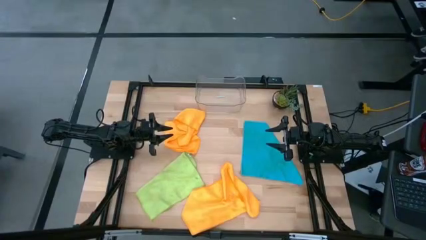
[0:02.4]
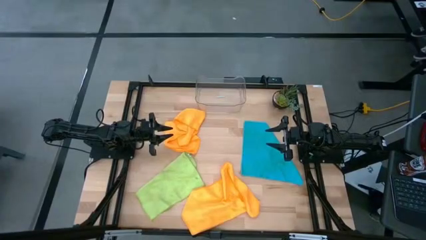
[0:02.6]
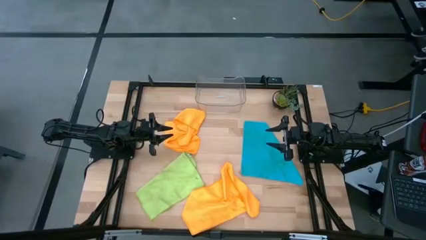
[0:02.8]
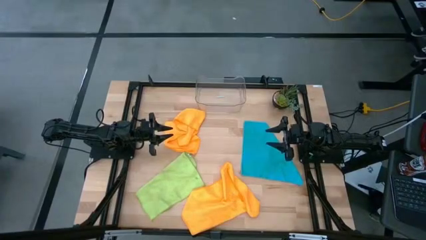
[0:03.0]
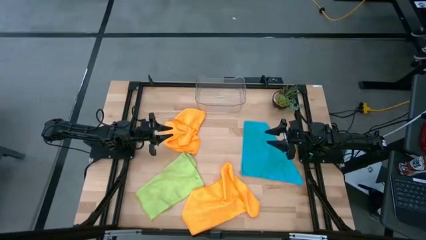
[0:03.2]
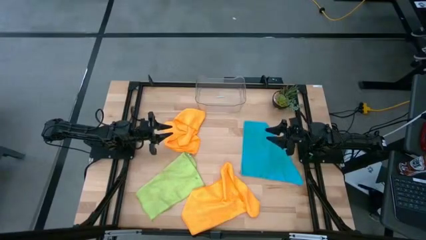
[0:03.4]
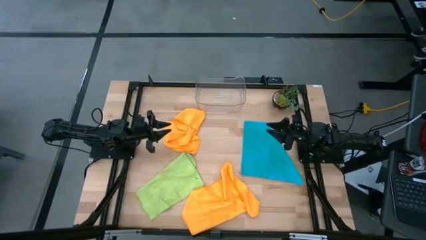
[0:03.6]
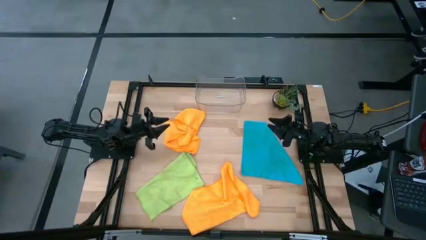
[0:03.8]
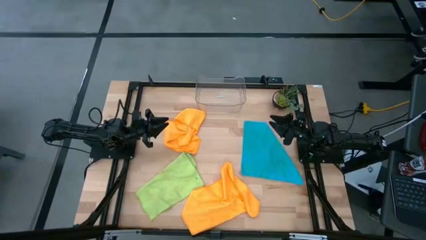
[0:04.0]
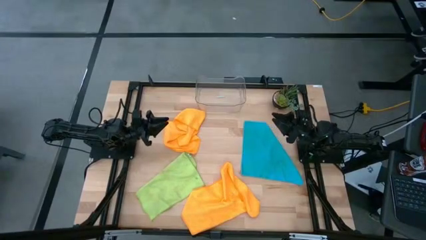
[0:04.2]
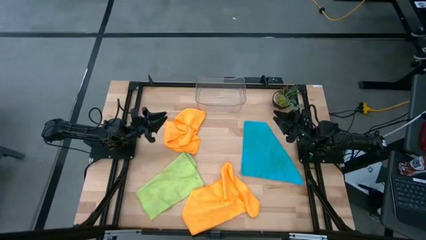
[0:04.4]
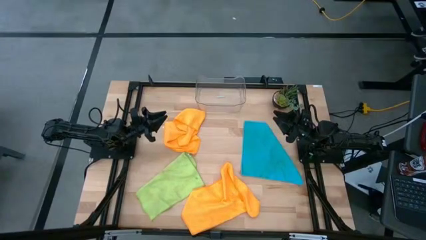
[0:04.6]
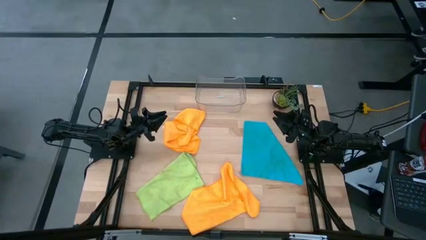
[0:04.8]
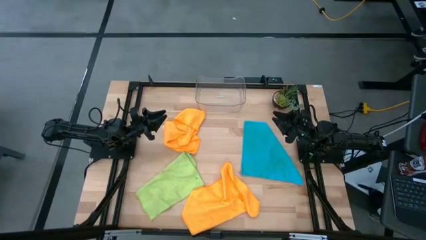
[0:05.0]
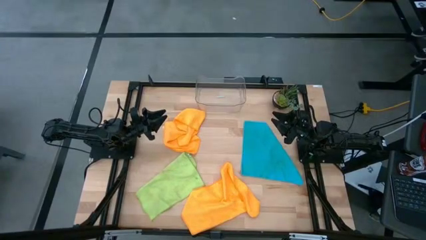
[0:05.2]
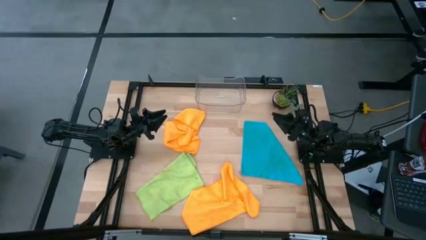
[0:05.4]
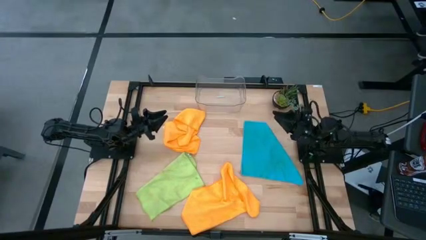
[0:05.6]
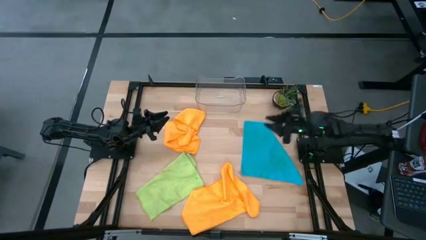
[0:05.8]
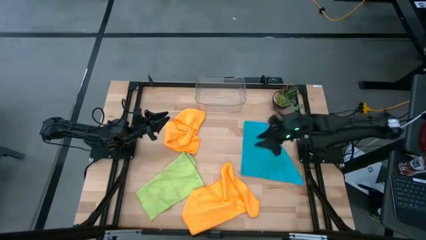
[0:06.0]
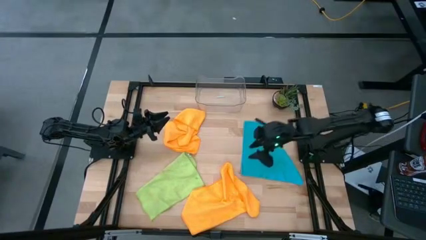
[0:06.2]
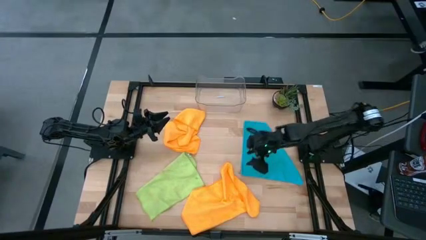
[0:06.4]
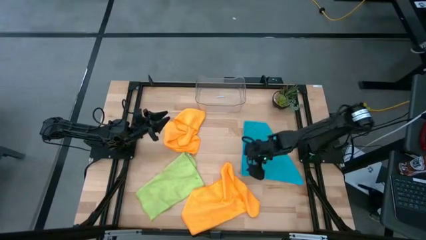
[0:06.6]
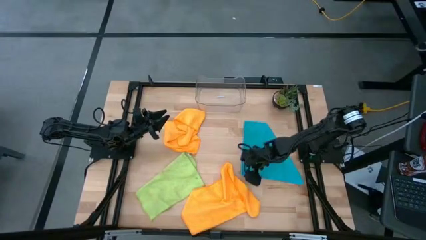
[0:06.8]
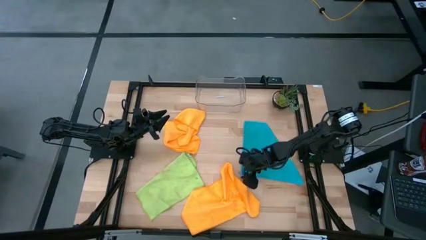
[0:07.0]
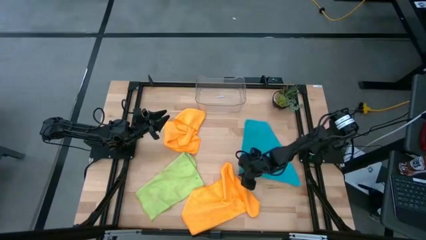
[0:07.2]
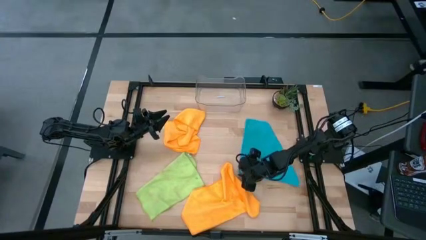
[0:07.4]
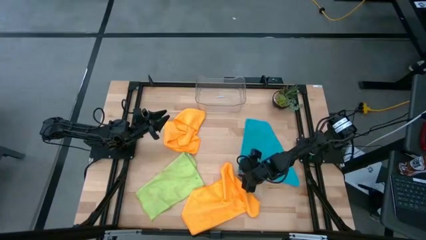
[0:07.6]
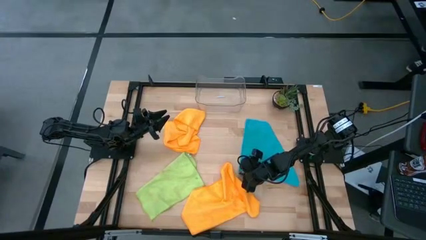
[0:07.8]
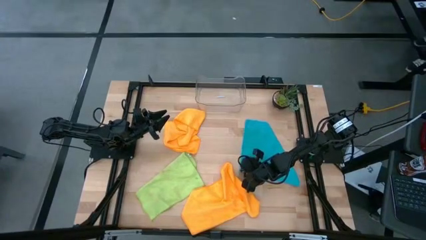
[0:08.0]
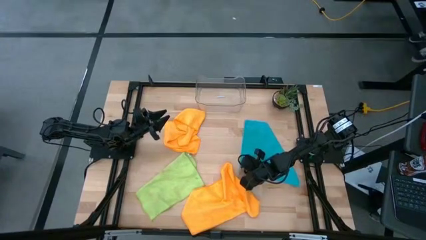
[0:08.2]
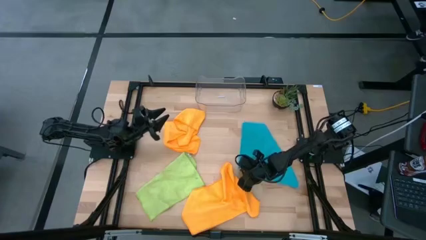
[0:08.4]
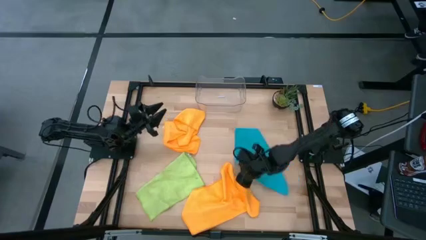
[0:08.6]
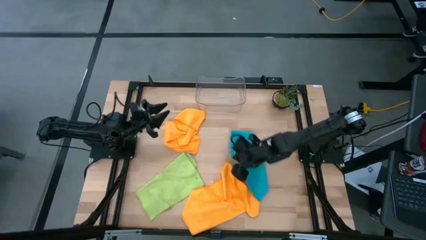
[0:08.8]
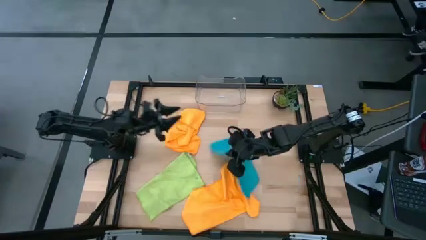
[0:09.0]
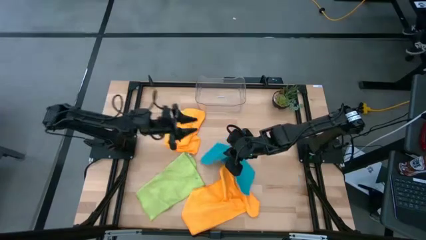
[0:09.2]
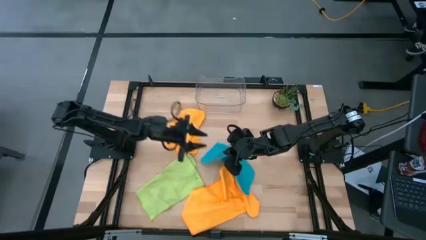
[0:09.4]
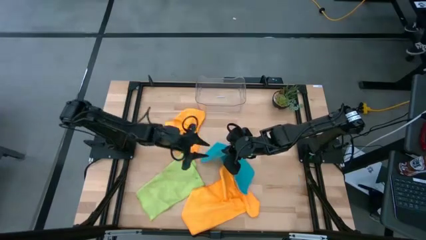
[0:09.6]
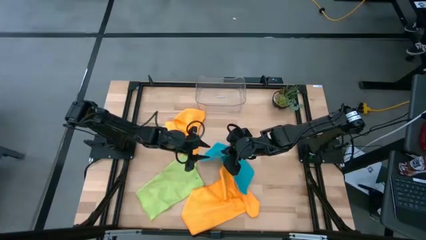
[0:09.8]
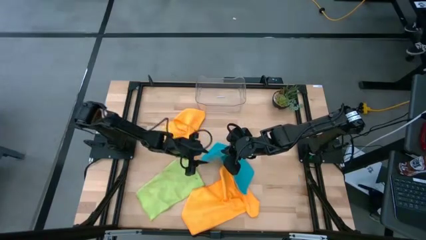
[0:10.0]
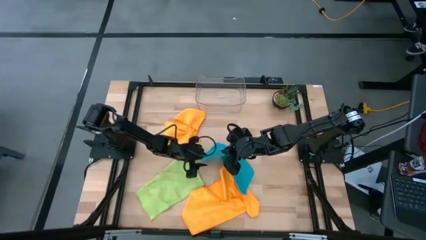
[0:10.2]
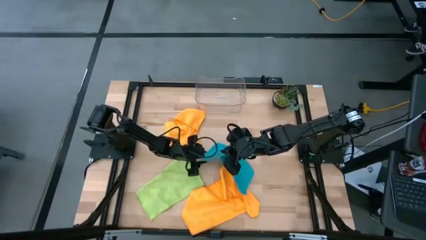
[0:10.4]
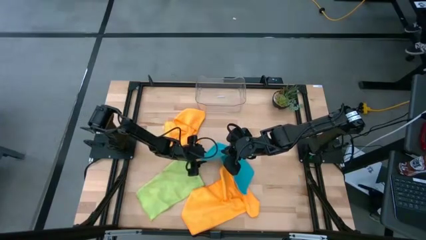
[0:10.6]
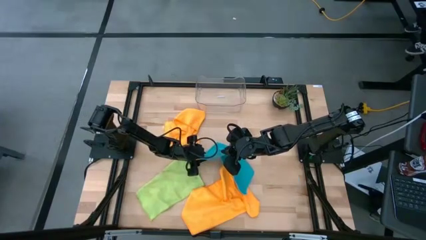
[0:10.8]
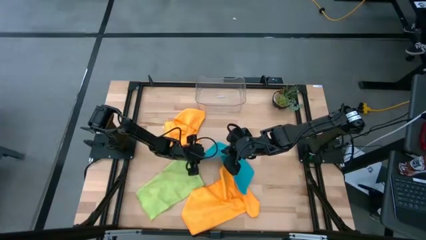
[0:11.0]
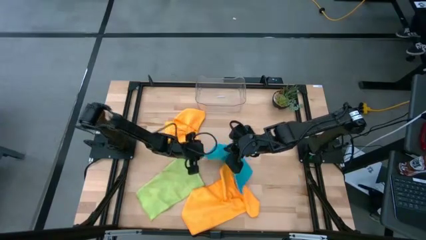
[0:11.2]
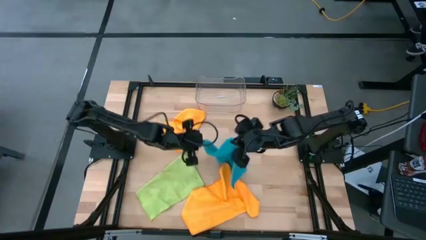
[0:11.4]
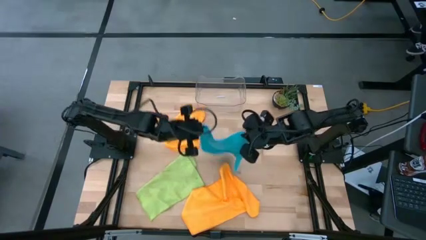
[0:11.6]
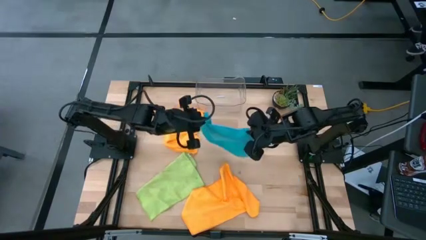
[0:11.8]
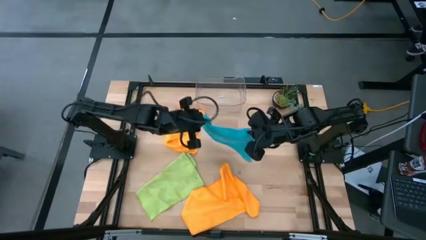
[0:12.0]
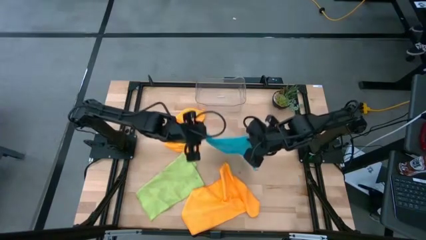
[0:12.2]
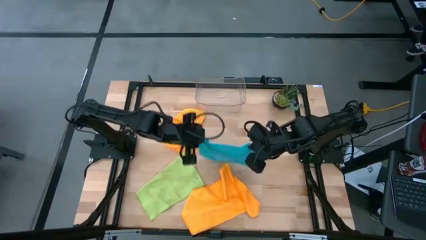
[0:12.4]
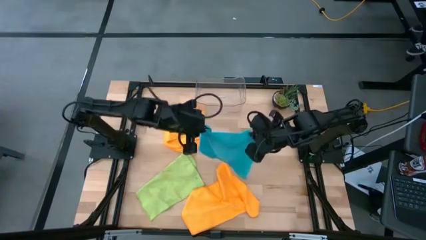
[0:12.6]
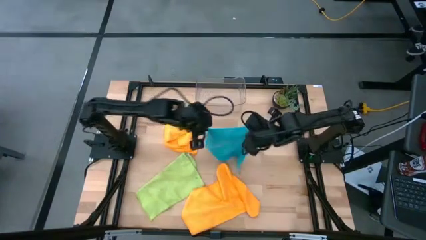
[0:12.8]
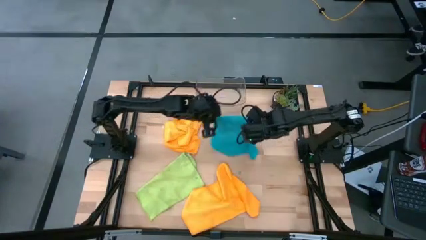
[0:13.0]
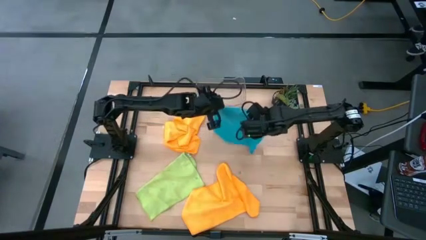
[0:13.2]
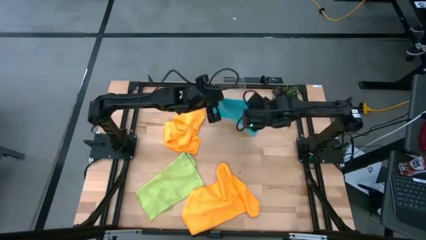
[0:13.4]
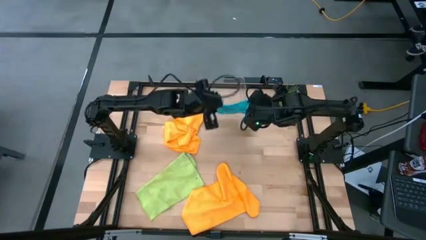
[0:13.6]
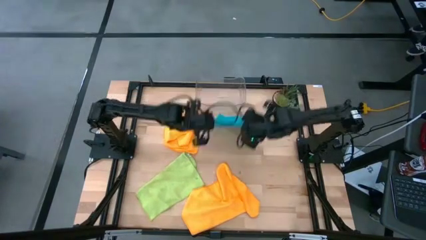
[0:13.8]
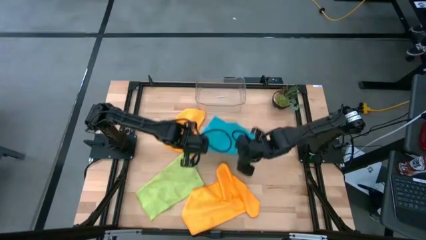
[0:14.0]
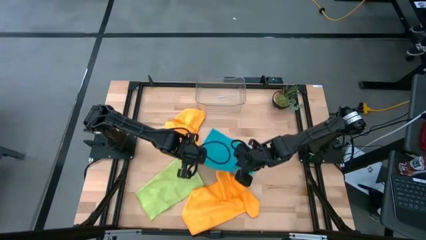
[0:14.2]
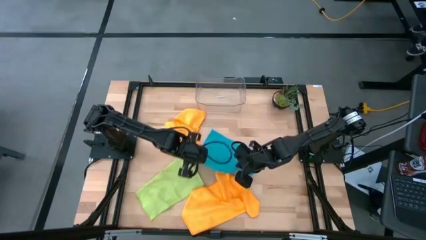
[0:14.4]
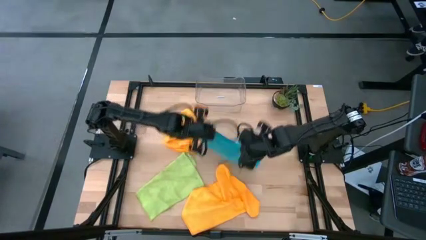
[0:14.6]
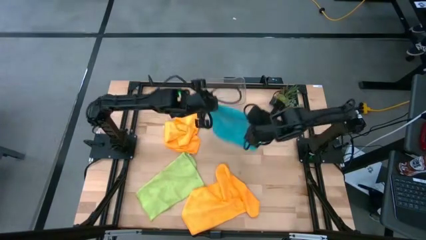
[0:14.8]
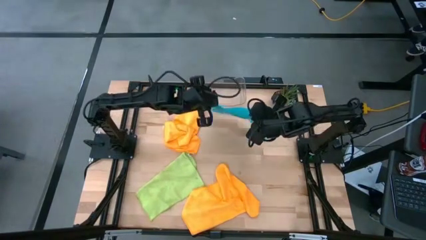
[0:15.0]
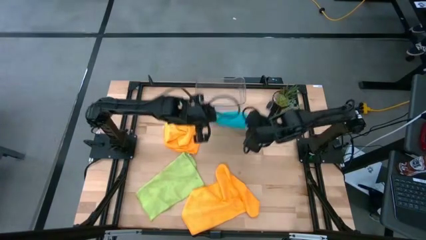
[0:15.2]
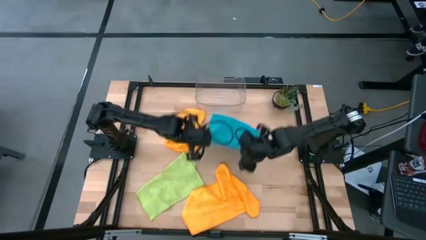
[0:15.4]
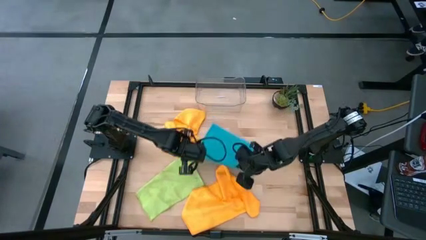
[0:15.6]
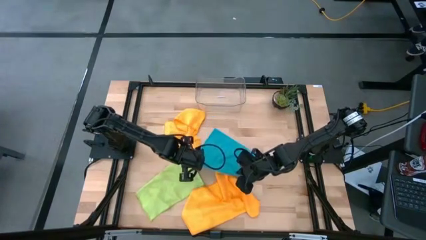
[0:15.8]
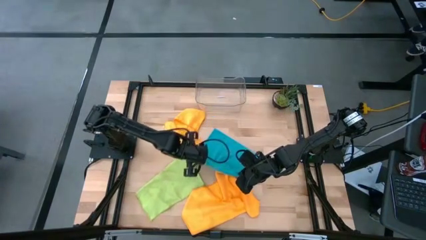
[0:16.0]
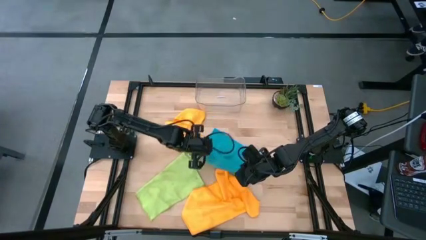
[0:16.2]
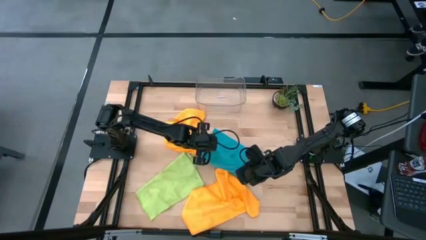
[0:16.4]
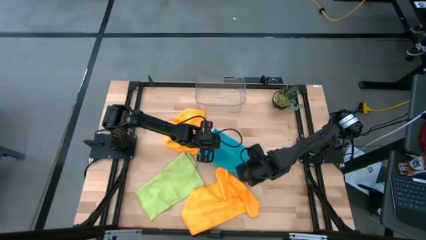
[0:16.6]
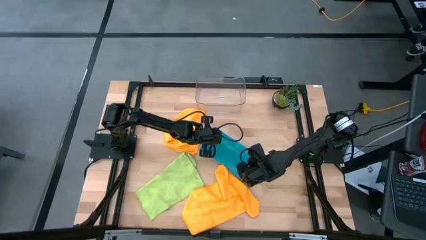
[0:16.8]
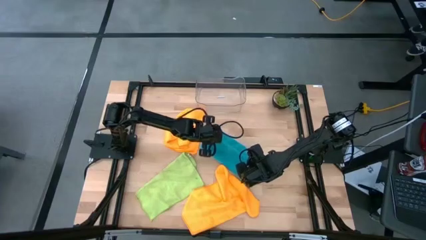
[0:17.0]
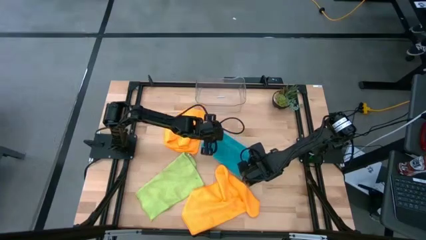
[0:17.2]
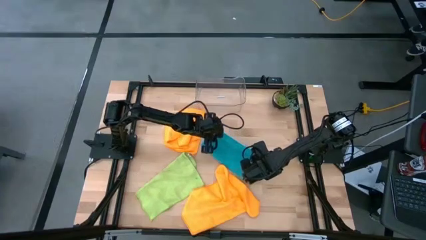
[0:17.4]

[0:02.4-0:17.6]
Task: Fold microfiber towels
Fold the blue microfiber cloth

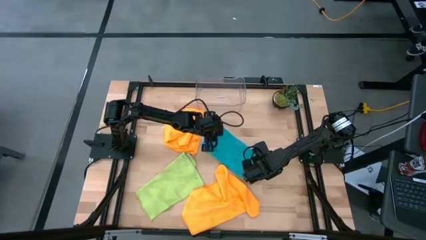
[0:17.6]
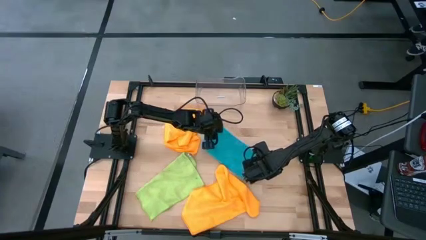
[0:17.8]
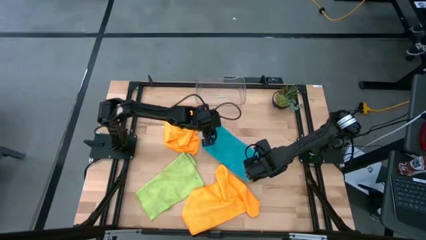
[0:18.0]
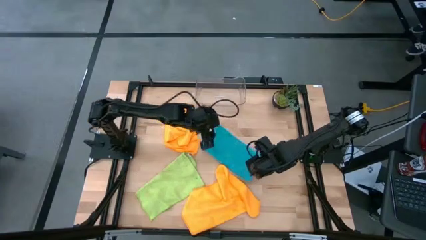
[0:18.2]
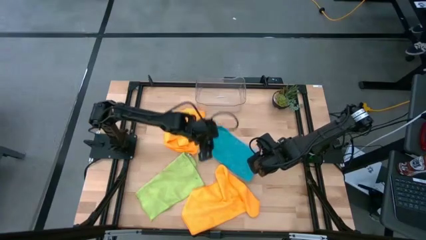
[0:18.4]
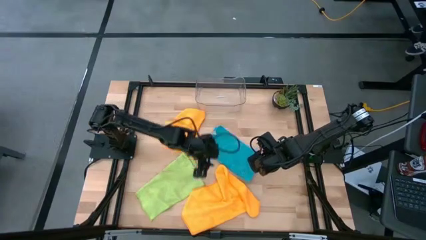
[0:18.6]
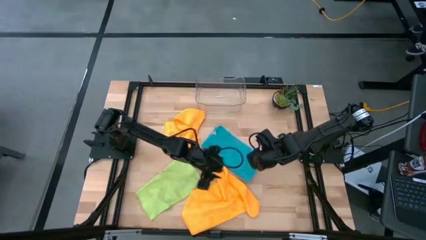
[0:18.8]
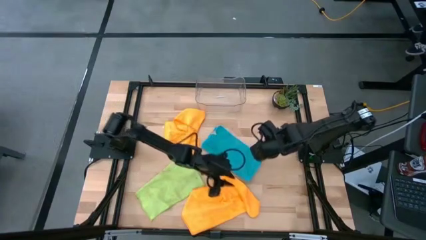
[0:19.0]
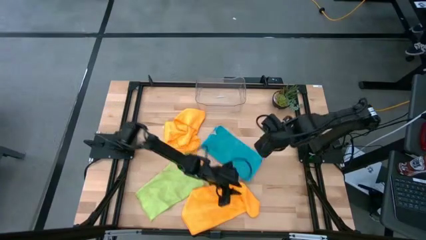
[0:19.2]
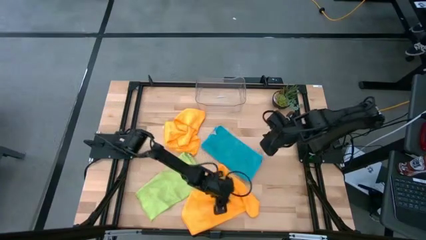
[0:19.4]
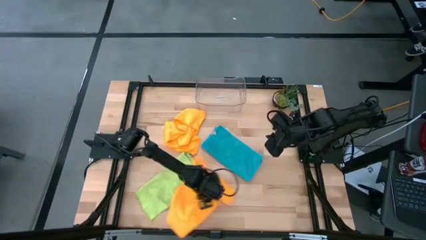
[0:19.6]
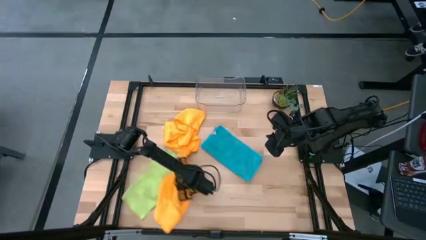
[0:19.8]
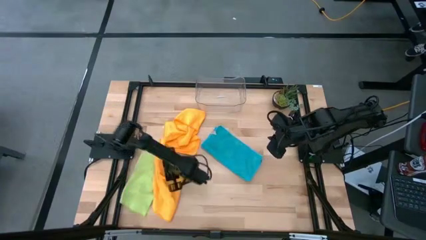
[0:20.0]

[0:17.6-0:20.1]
Move the bottom orange microfiber cloth to the bottom left of the table
